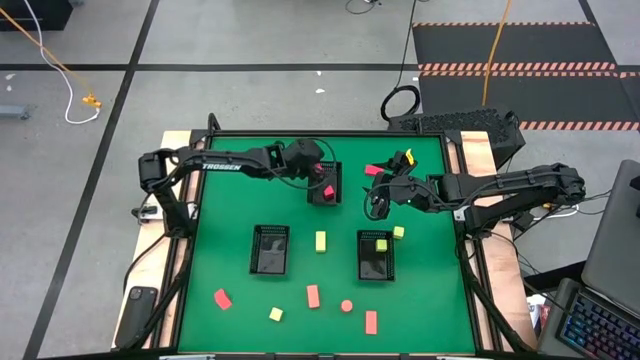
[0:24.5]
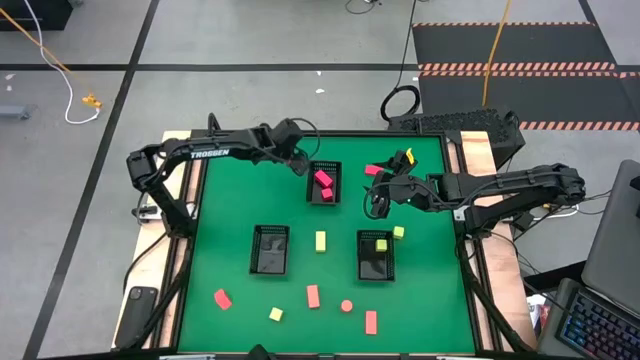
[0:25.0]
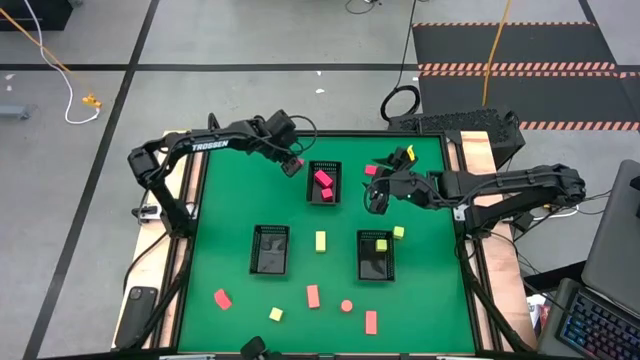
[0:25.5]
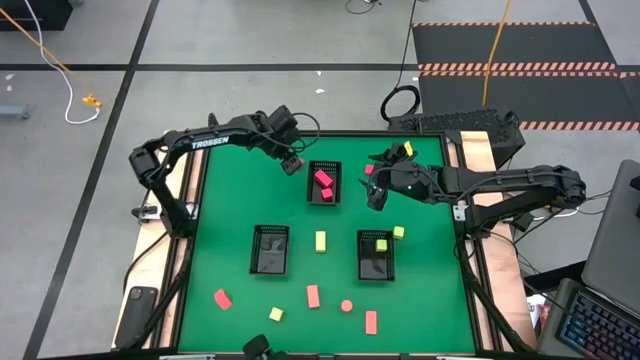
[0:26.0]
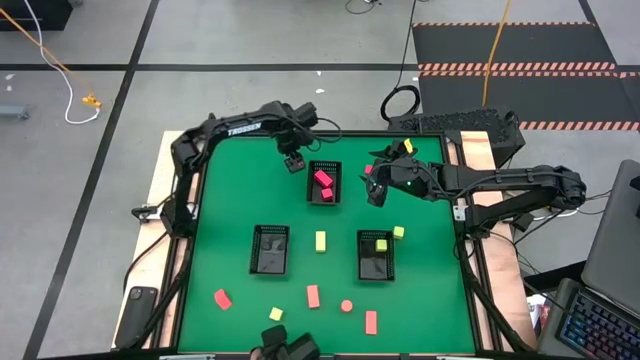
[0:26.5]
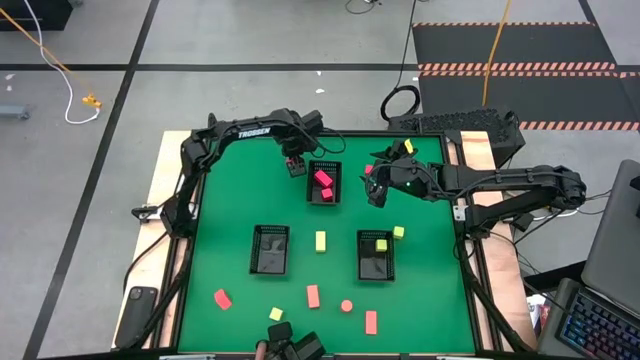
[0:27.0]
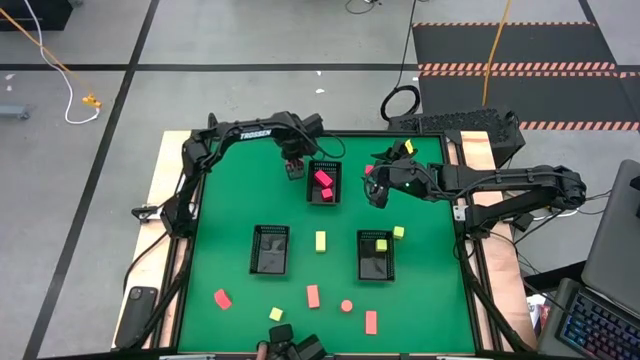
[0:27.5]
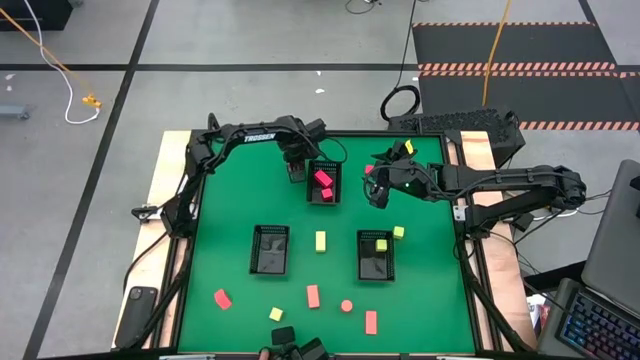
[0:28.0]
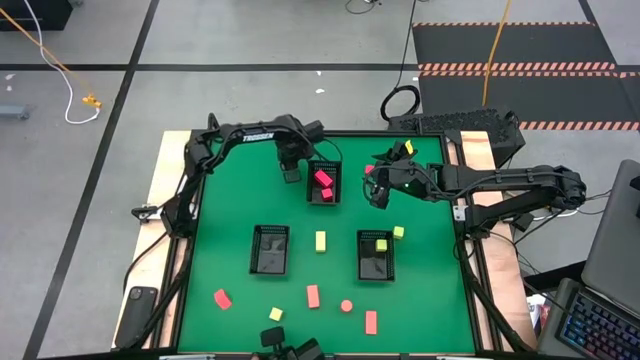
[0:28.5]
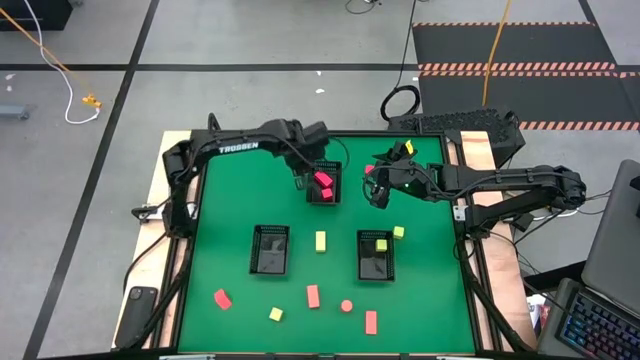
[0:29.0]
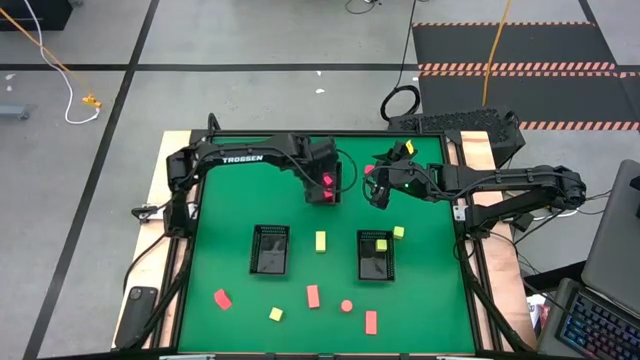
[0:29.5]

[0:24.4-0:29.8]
Task: Sort & place blocks by color
Put the red block into the top black bin

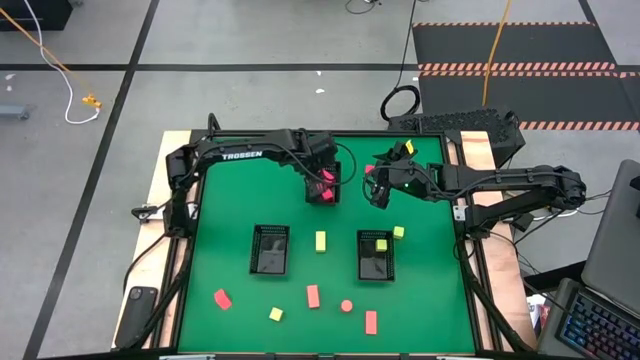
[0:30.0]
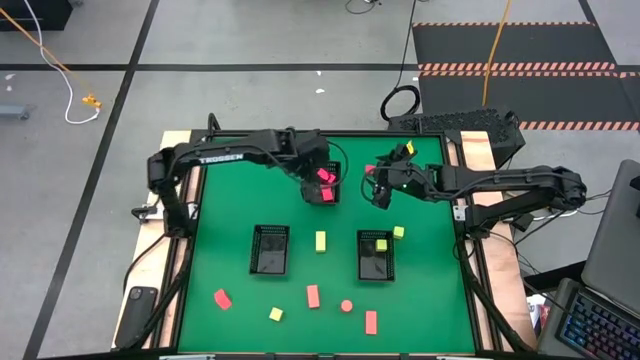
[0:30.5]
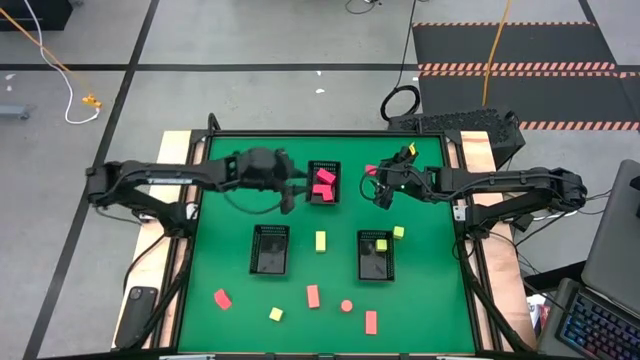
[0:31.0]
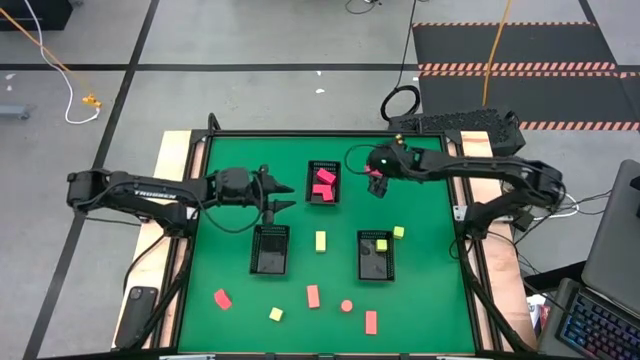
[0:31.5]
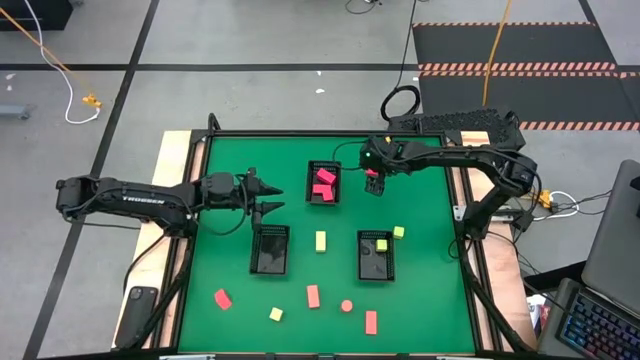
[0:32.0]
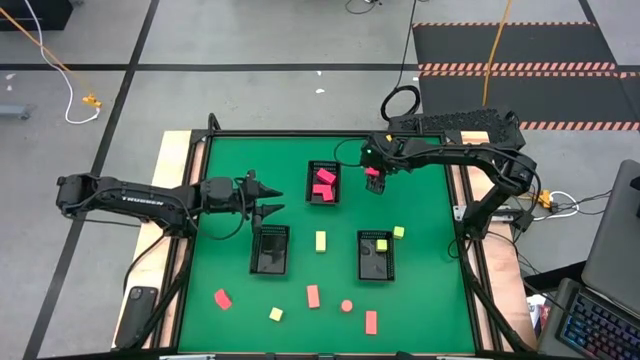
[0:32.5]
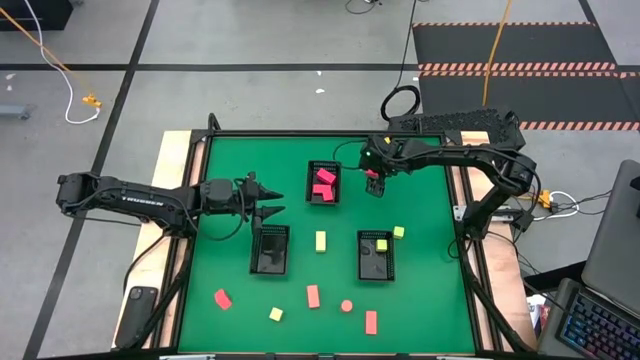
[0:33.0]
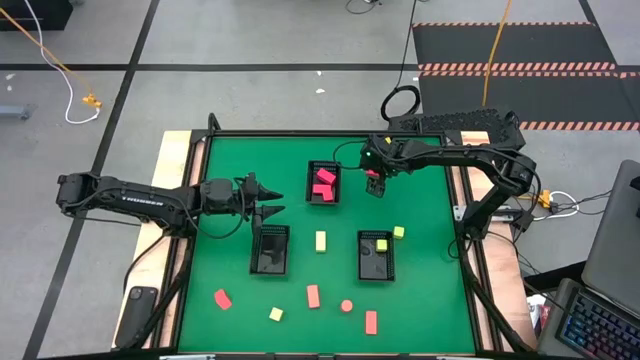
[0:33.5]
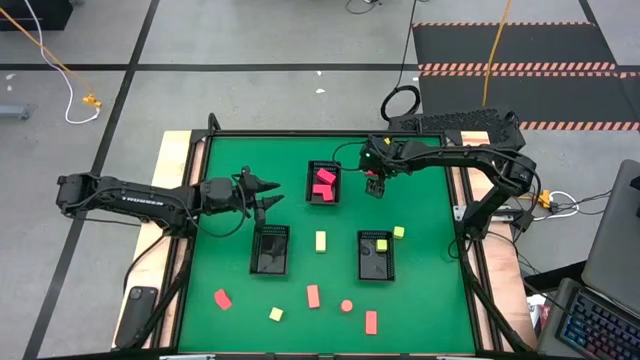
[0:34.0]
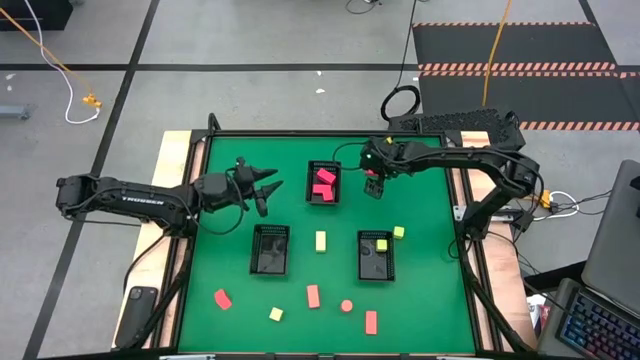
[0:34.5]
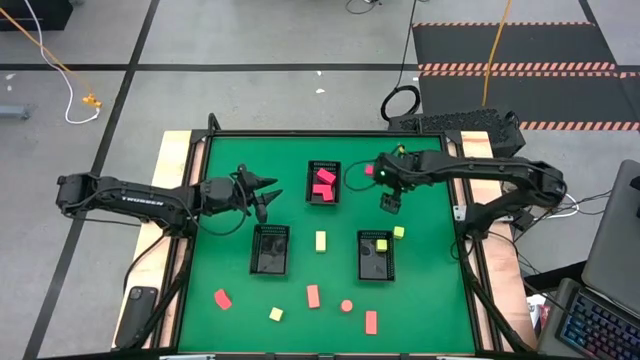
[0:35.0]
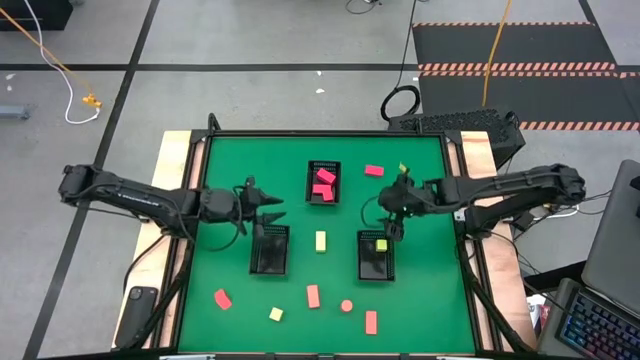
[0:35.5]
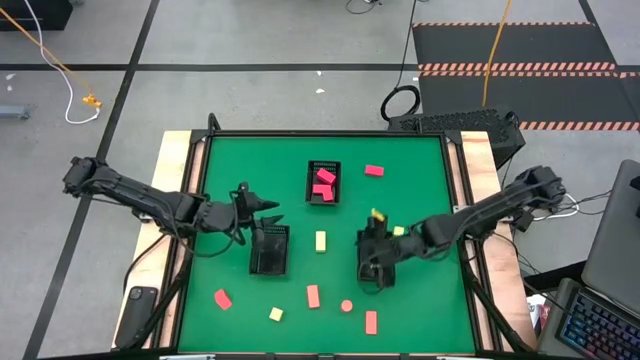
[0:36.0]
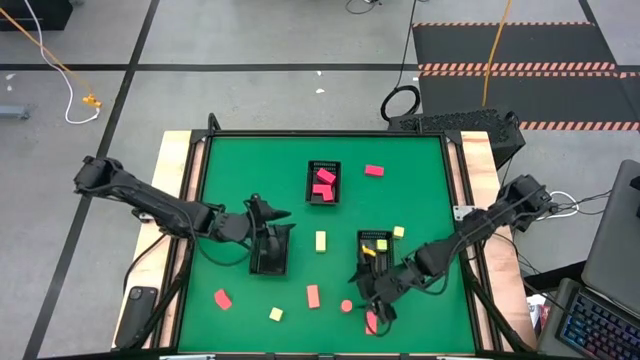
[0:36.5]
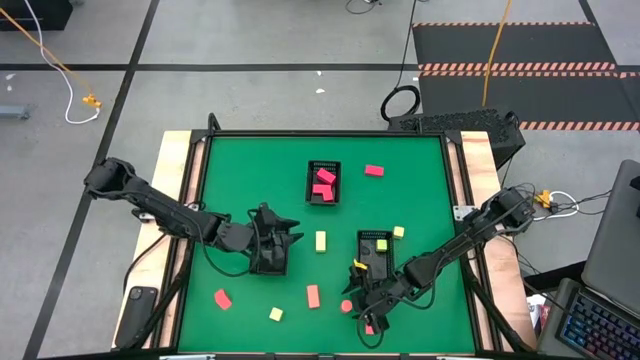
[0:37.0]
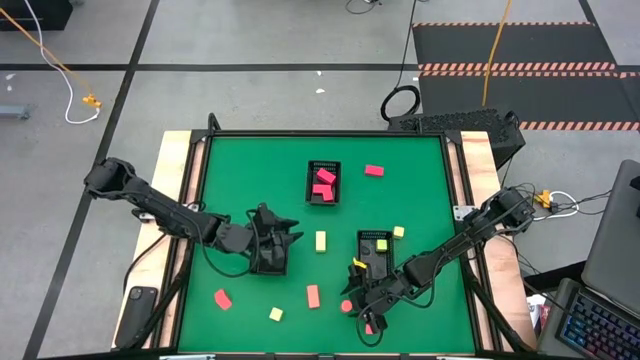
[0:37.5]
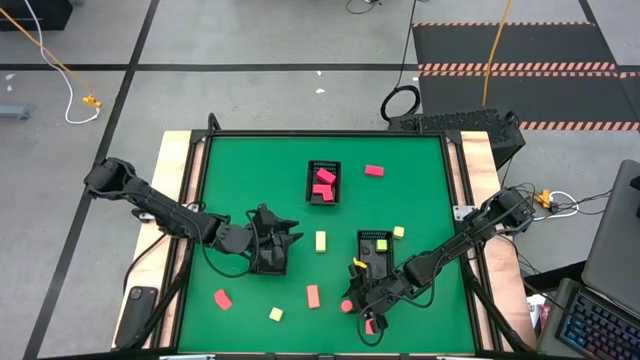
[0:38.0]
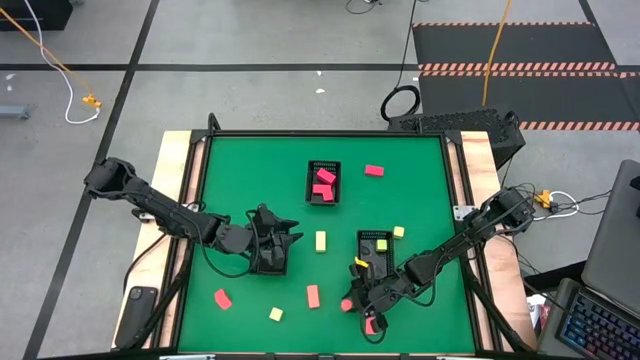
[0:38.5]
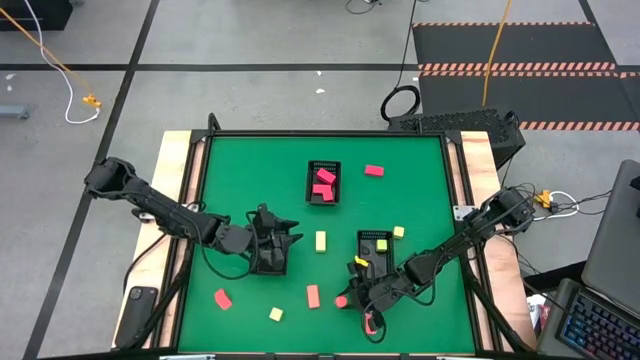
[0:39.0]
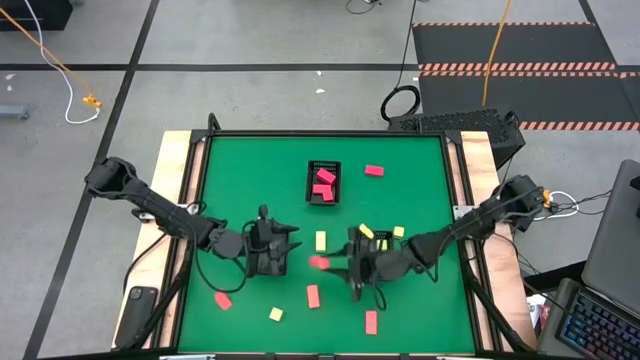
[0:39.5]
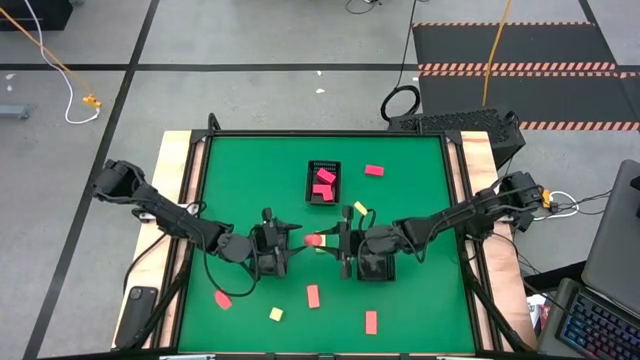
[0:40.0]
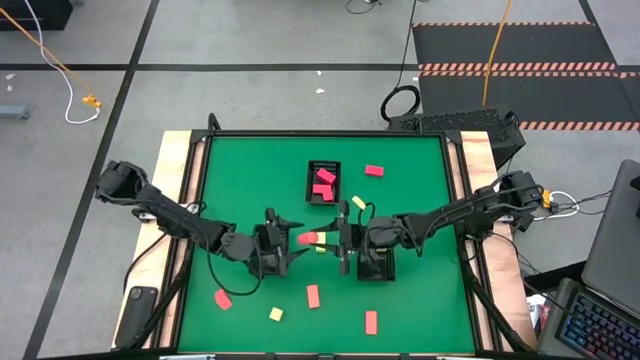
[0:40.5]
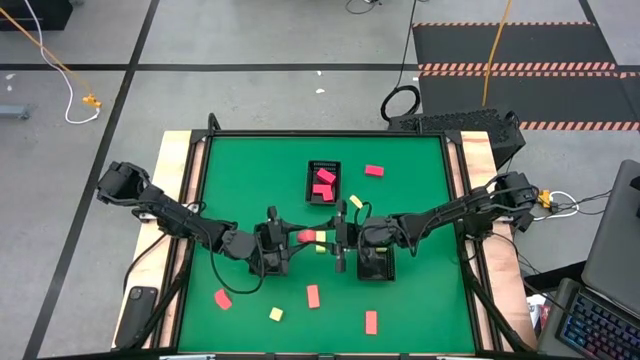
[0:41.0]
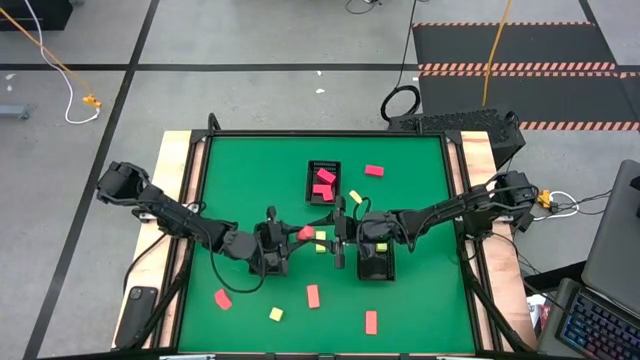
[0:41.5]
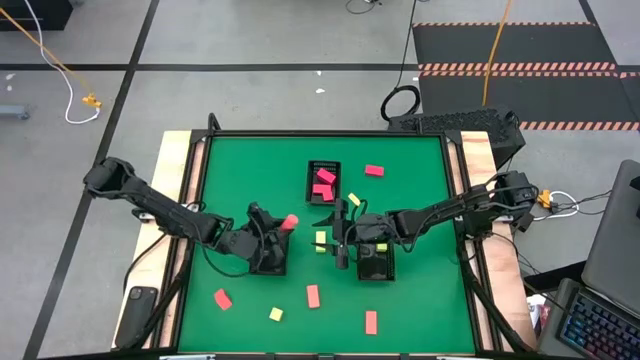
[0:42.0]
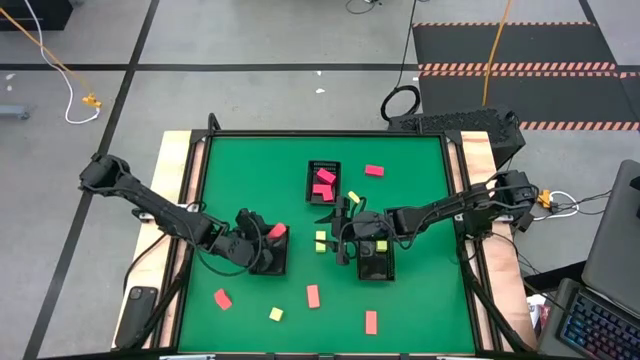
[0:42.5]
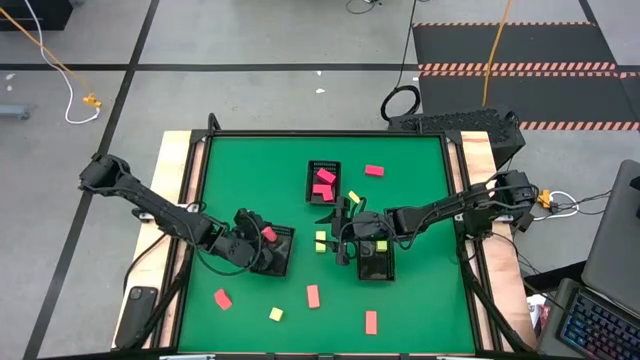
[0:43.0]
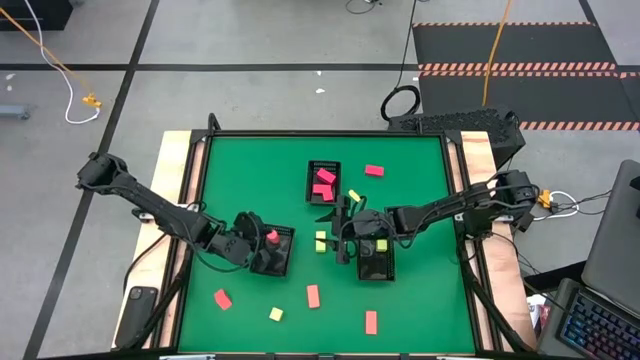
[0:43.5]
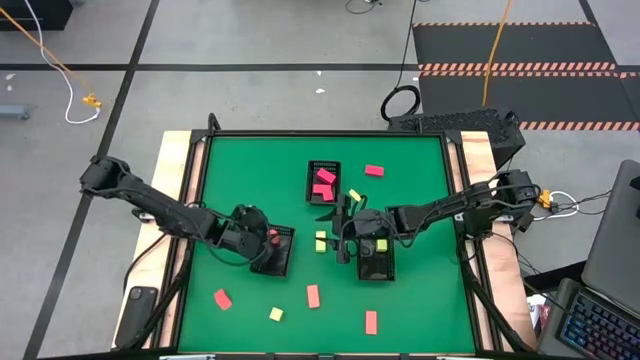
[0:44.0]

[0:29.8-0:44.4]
Put the orange block into the bottom left black bin

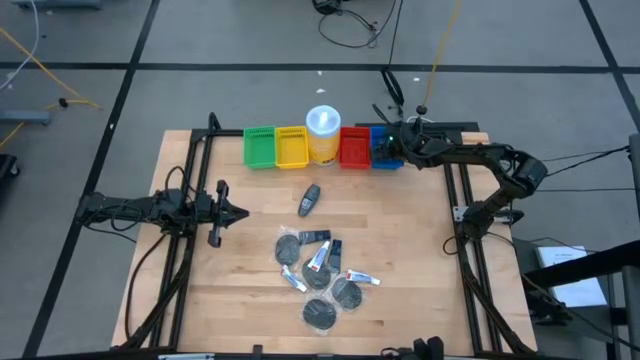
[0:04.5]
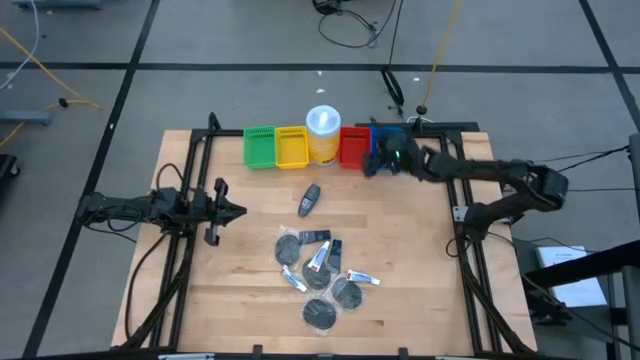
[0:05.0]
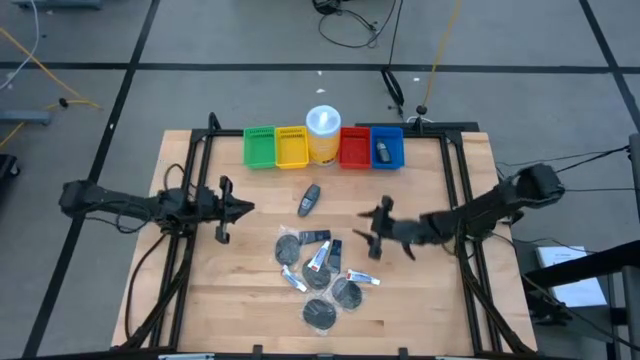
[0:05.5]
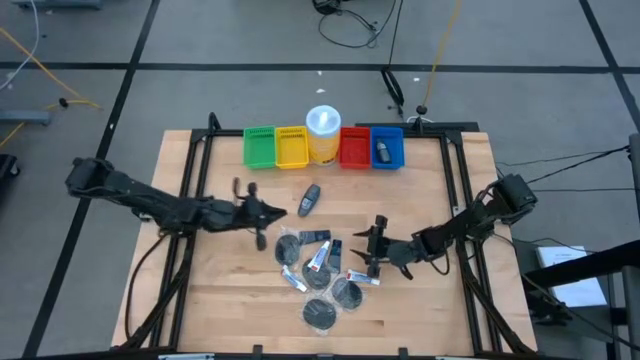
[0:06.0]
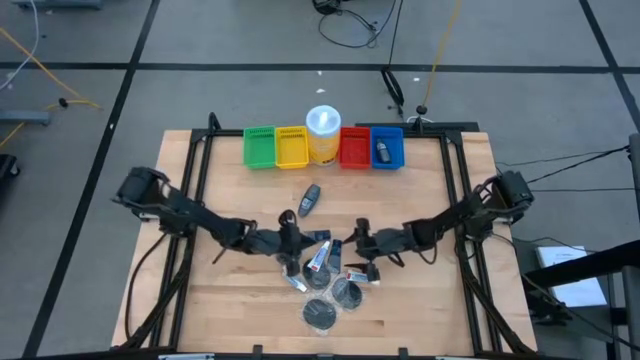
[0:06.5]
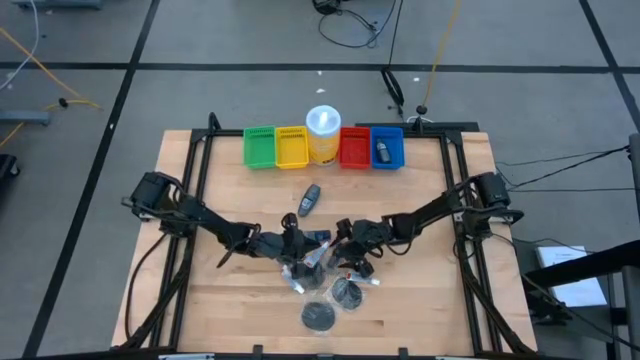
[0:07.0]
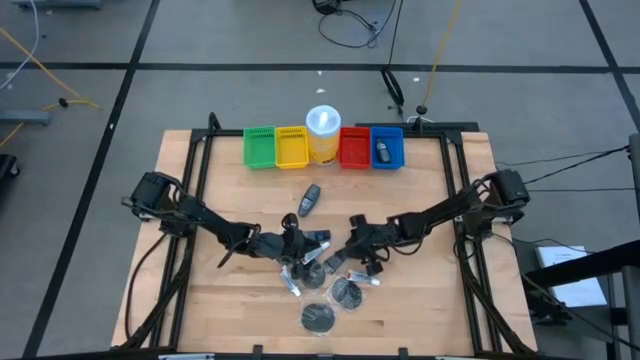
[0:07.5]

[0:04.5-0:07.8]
Task: Pick & Place Travel size toiletries
Put the dark blue shave cream into the red basket
